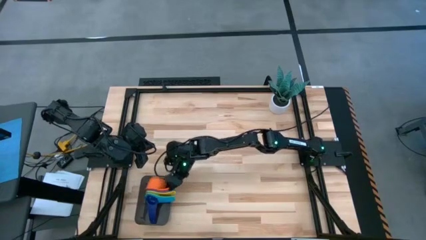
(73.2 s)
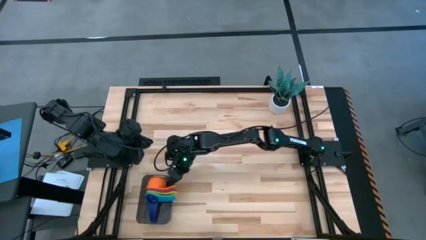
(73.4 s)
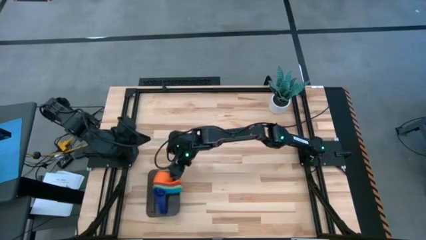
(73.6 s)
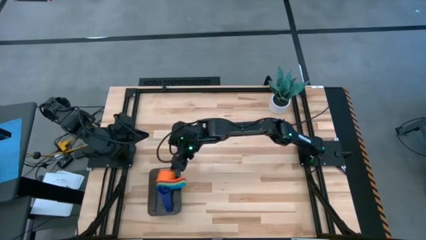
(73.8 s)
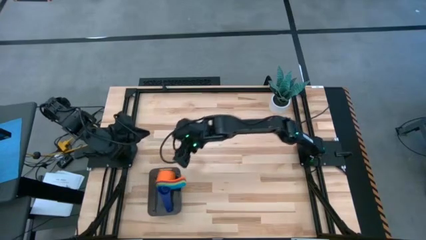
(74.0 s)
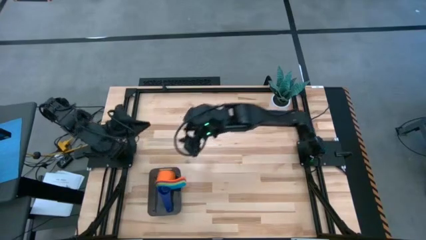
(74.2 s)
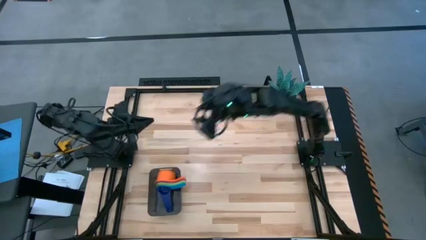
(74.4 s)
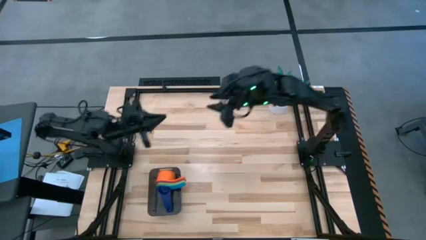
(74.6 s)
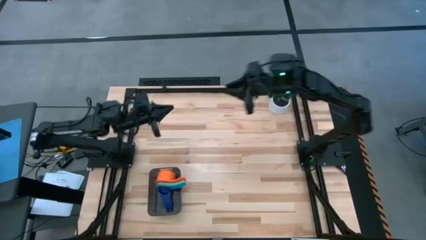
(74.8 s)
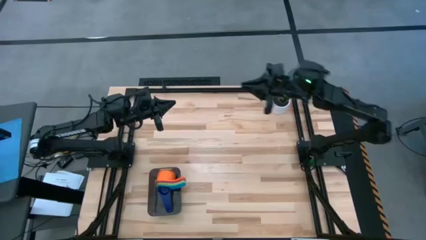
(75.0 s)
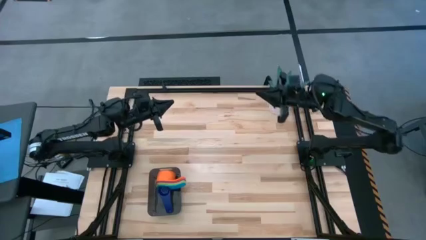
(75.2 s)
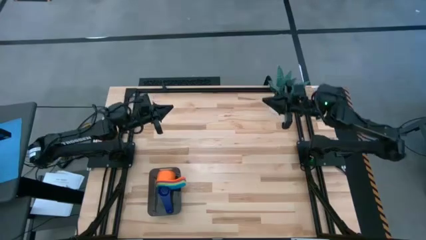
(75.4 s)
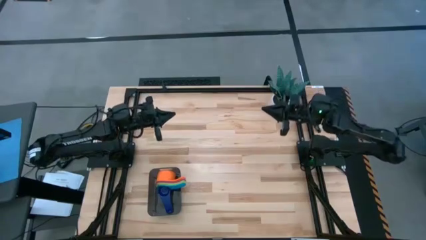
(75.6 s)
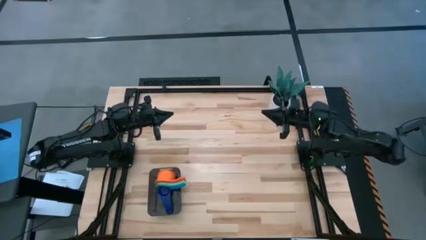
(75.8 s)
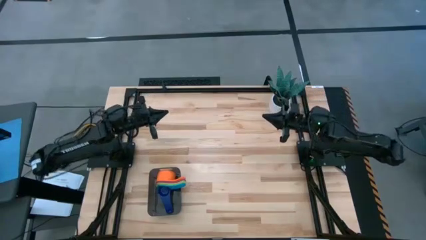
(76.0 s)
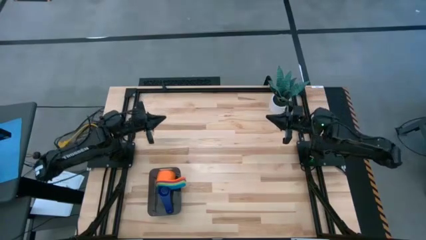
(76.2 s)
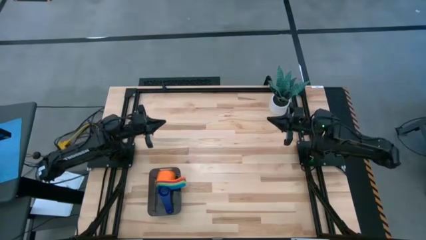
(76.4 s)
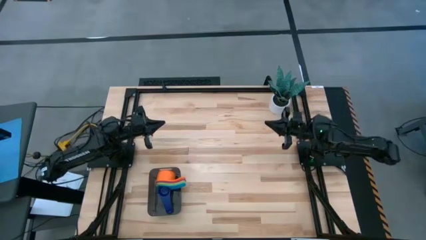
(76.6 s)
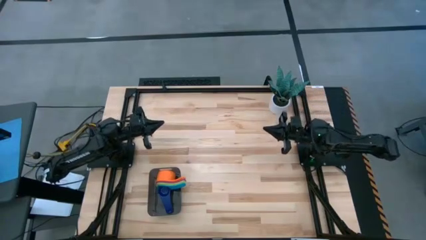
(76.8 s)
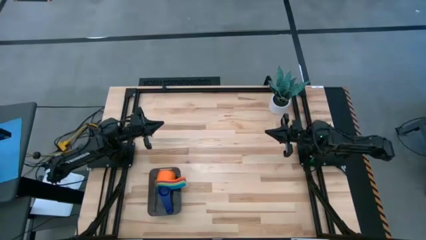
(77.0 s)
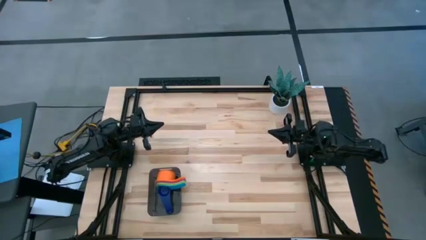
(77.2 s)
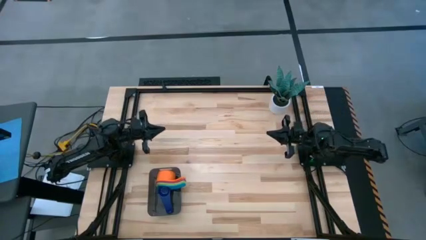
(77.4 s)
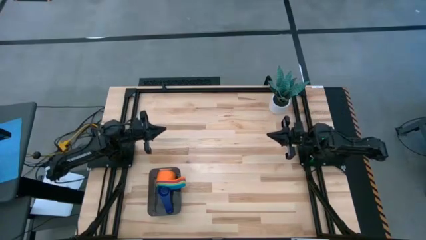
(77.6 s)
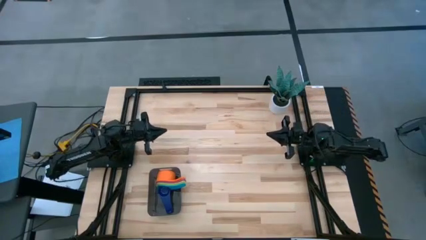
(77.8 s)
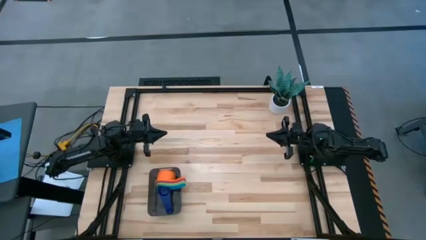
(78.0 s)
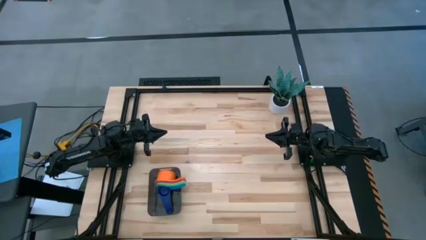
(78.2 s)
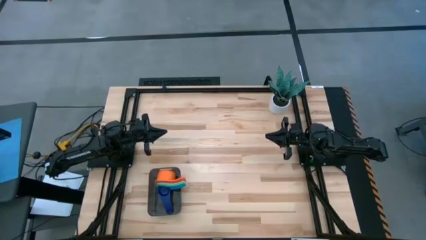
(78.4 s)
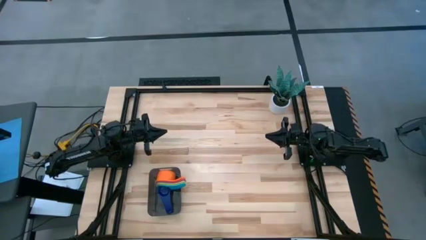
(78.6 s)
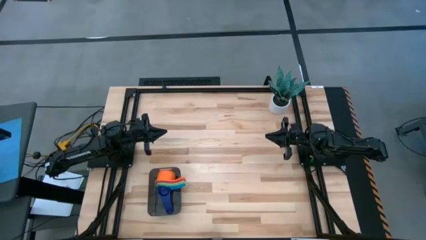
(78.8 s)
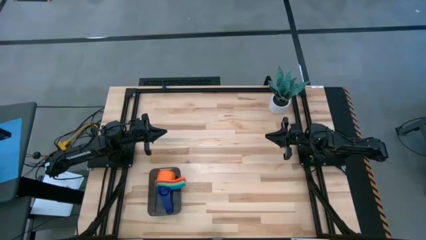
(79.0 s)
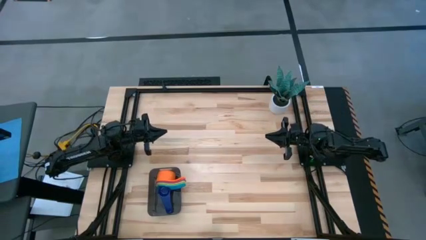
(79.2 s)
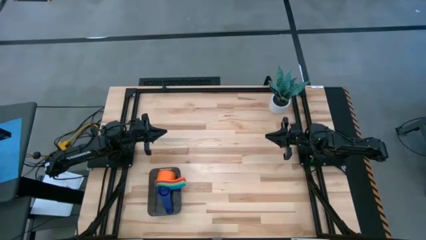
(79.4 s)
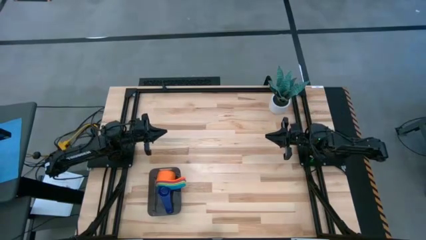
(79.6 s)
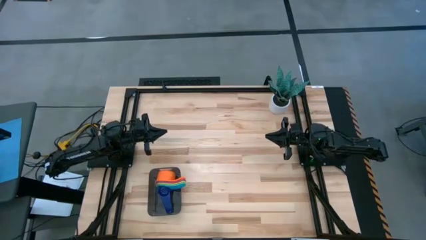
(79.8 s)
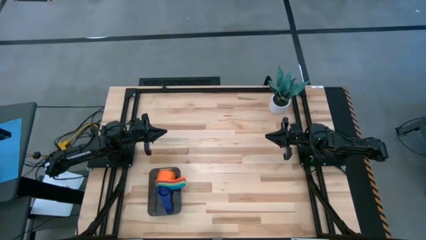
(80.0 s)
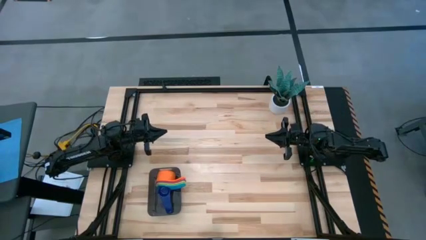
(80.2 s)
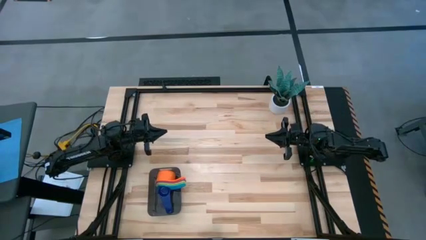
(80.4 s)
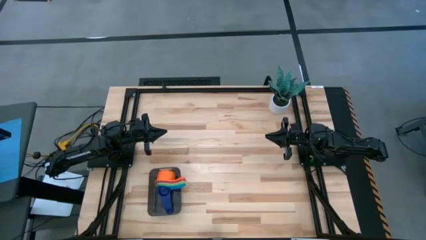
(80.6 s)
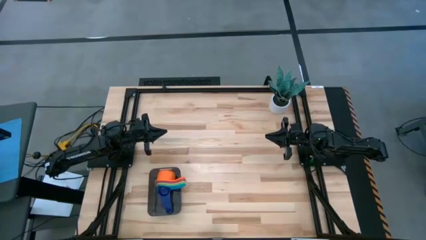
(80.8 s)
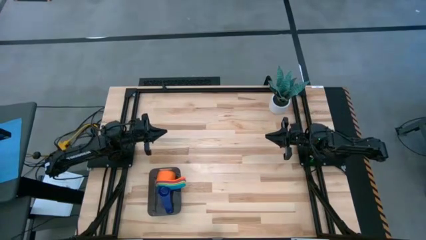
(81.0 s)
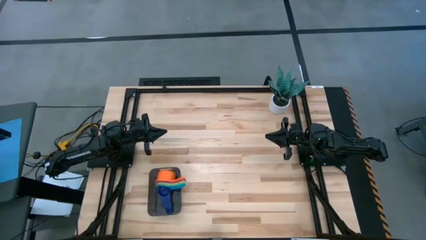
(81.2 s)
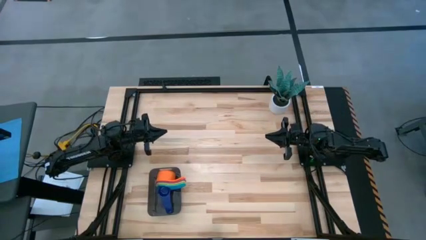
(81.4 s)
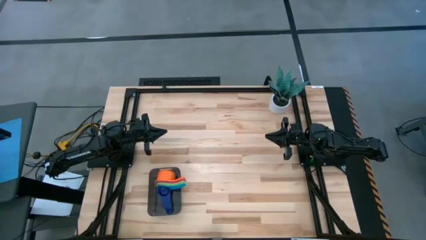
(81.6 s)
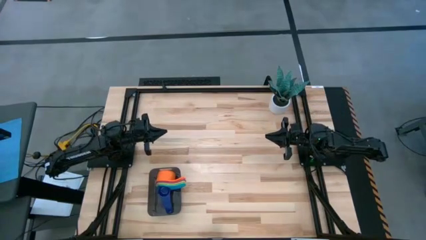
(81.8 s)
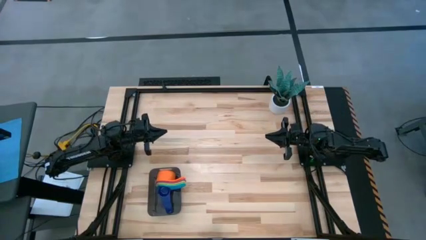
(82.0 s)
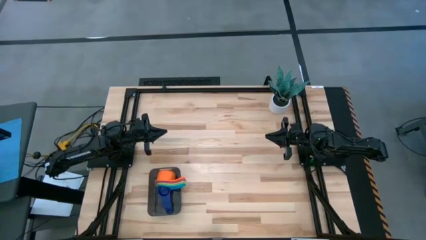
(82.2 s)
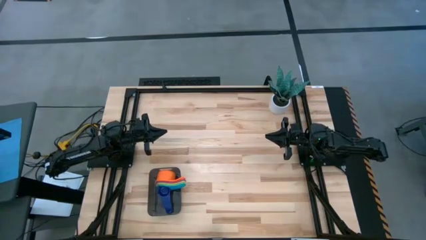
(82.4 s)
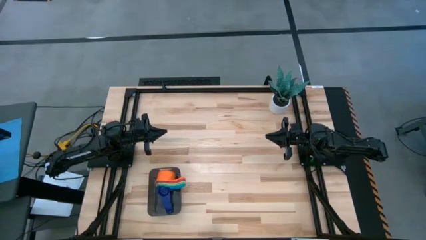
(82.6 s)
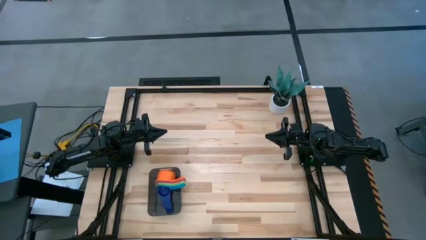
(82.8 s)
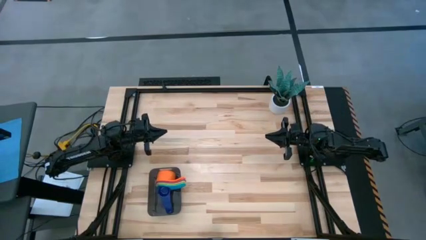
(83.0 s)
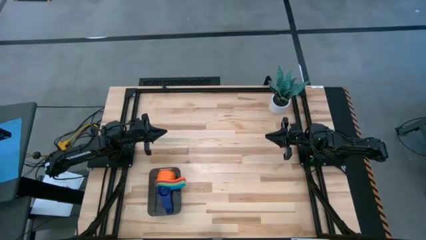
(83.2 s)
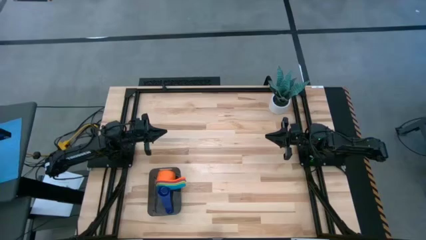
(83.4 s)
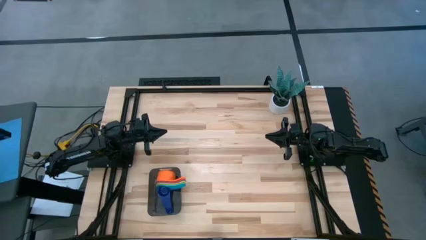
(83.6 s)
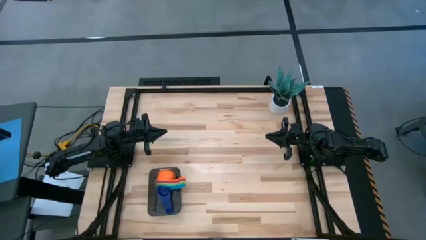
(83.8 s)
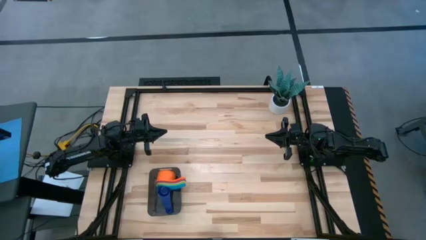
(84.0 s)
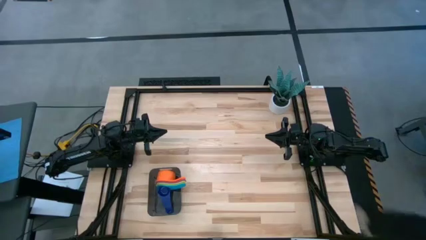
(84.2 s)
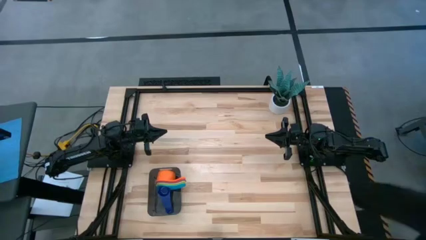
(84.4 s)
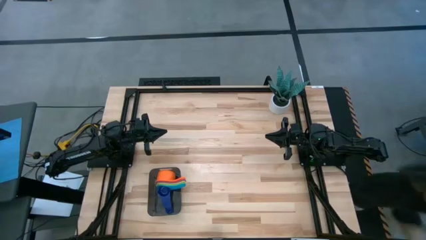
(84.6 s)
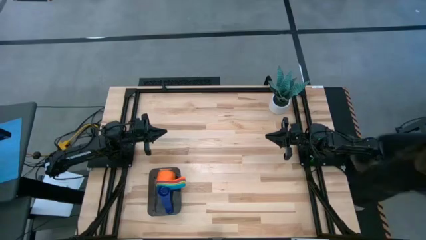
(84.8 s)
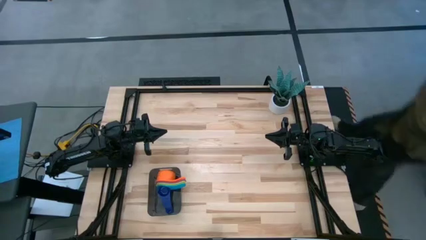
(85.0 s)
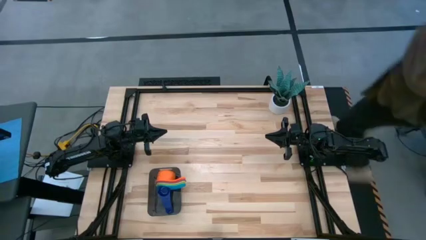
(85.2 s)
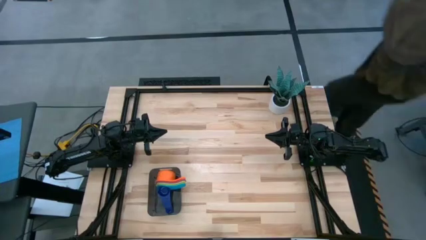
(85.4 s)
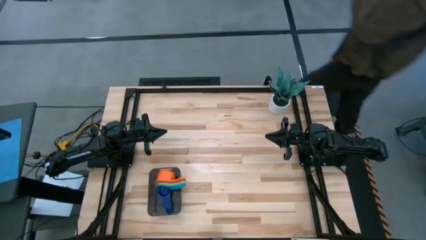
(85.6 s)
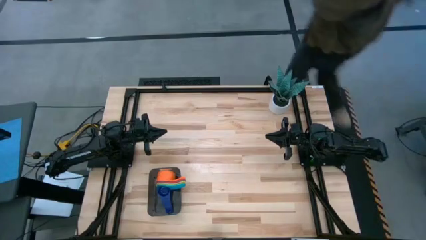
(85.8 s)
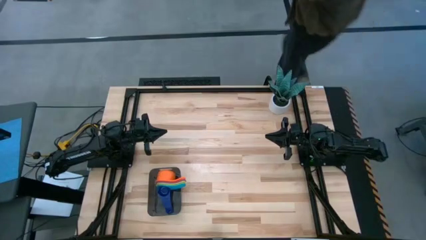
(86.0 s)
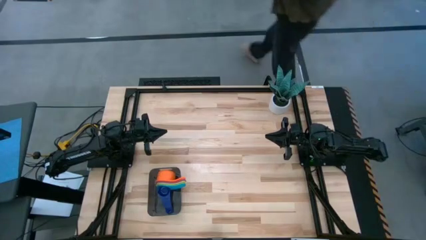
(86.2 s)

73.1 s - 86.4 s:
Task: Nest measuring cups in basket
Return to Home Position
